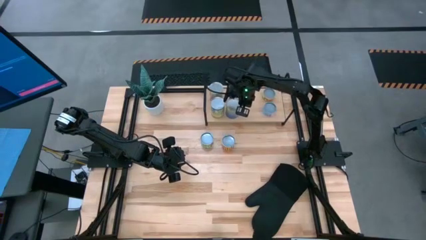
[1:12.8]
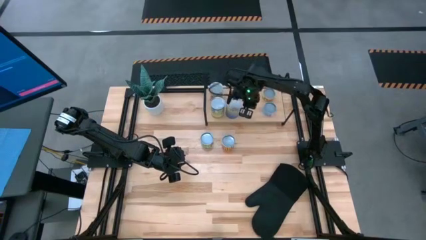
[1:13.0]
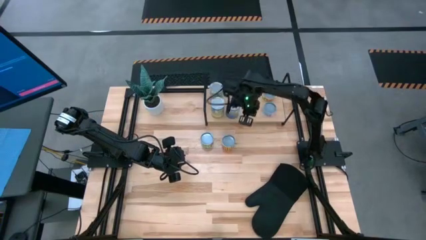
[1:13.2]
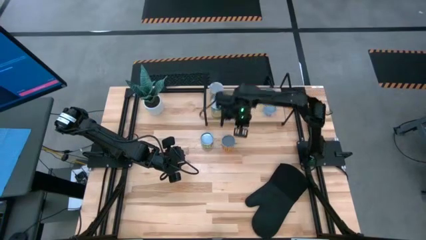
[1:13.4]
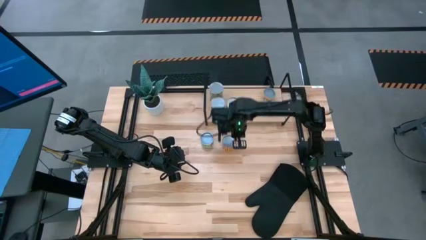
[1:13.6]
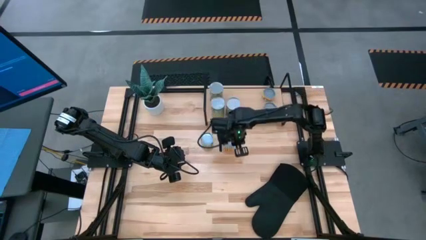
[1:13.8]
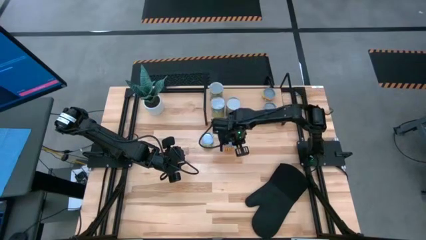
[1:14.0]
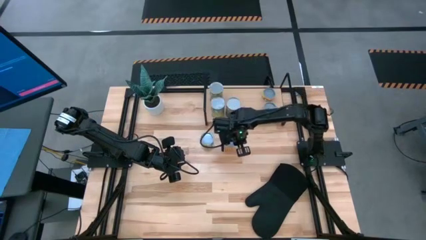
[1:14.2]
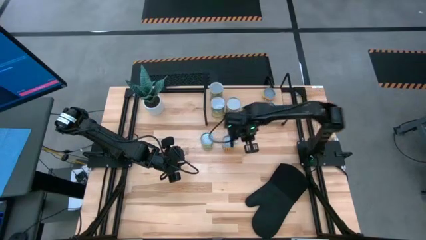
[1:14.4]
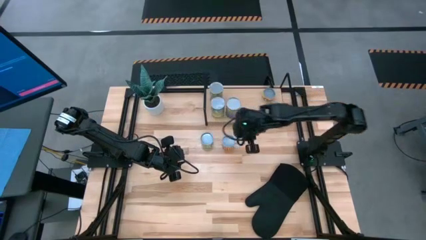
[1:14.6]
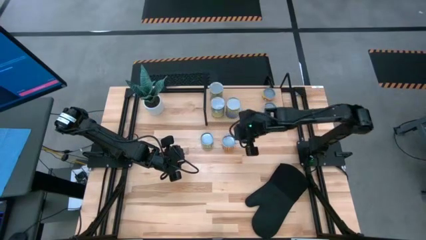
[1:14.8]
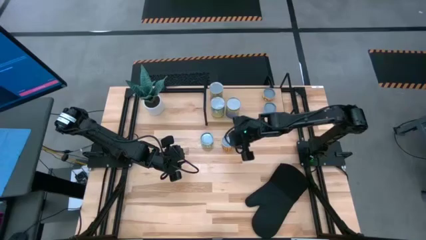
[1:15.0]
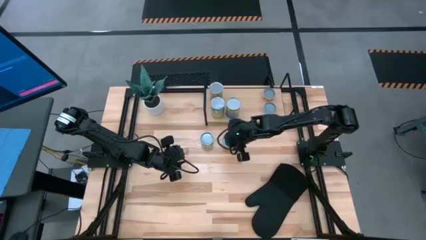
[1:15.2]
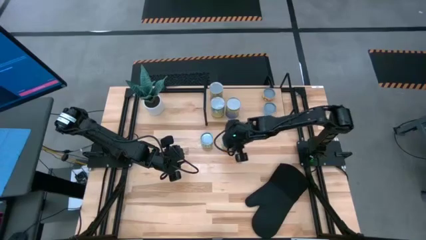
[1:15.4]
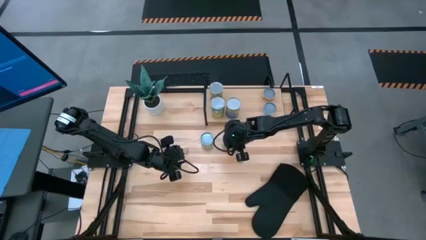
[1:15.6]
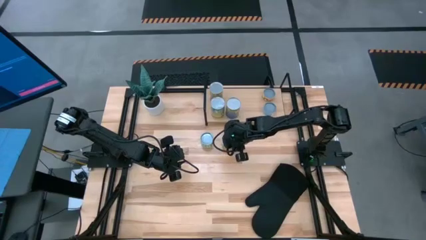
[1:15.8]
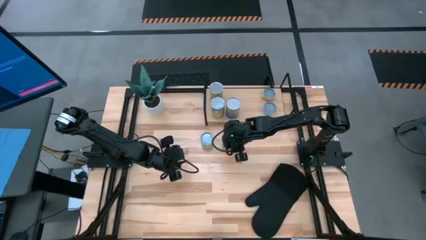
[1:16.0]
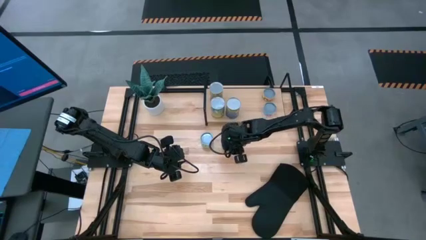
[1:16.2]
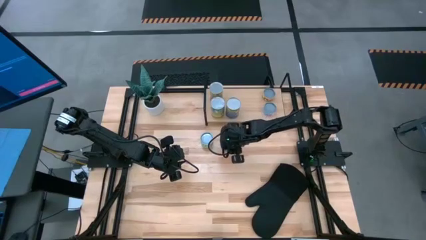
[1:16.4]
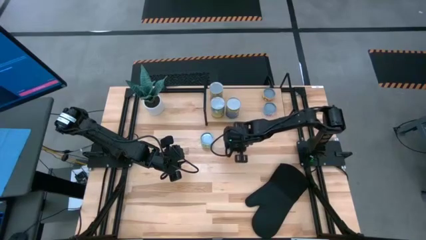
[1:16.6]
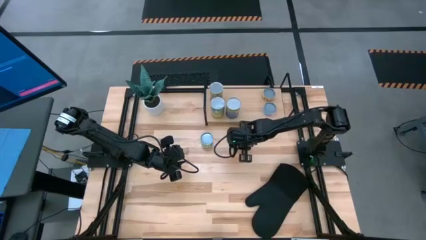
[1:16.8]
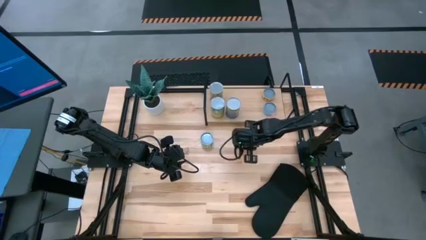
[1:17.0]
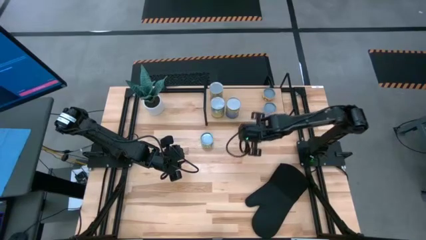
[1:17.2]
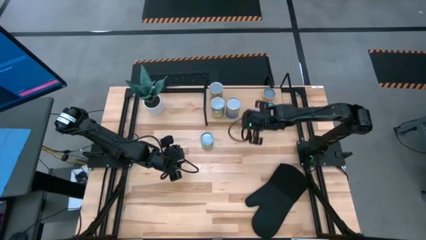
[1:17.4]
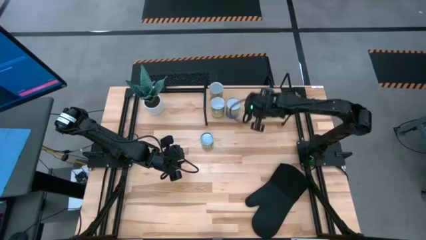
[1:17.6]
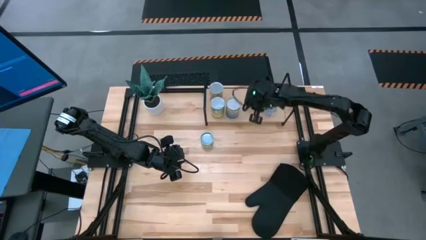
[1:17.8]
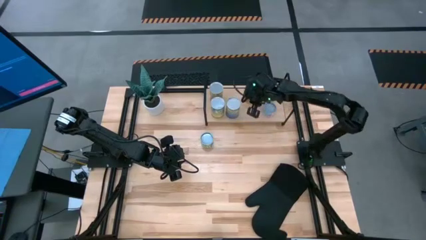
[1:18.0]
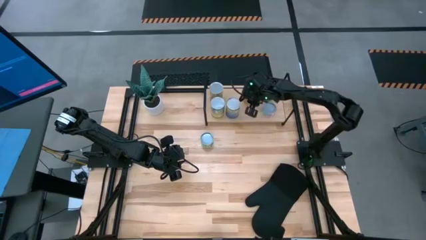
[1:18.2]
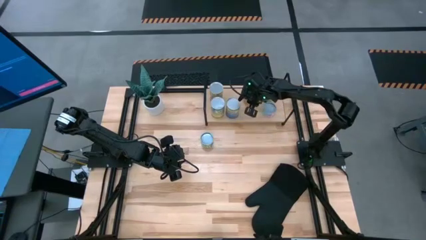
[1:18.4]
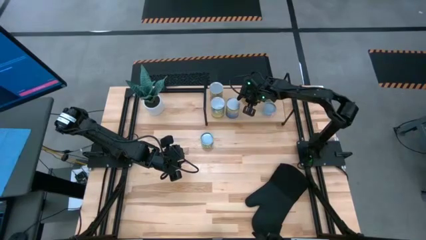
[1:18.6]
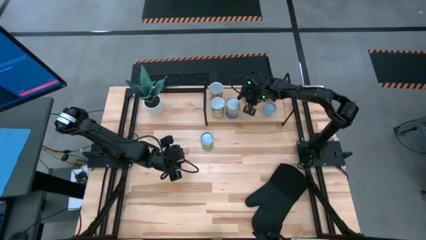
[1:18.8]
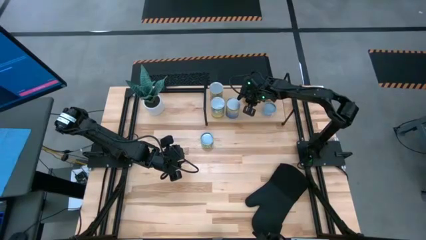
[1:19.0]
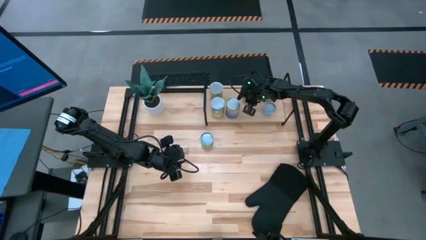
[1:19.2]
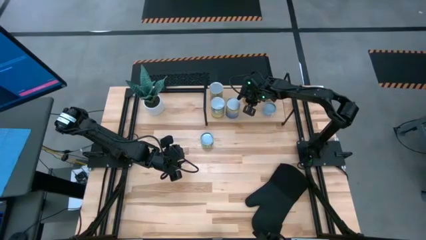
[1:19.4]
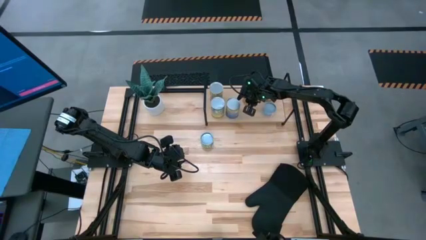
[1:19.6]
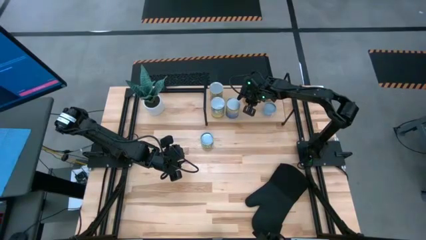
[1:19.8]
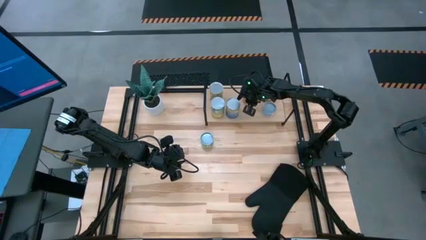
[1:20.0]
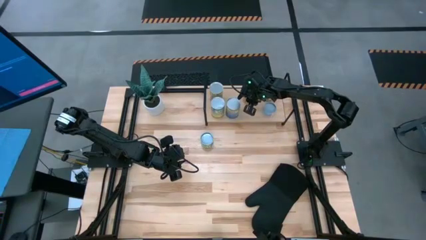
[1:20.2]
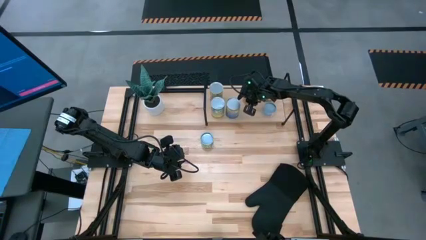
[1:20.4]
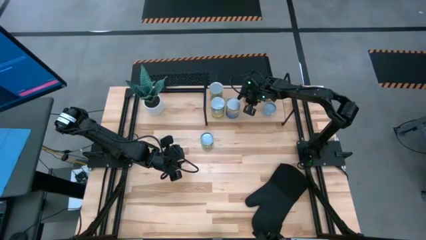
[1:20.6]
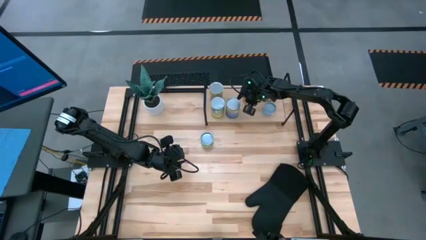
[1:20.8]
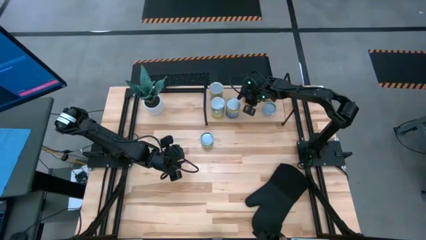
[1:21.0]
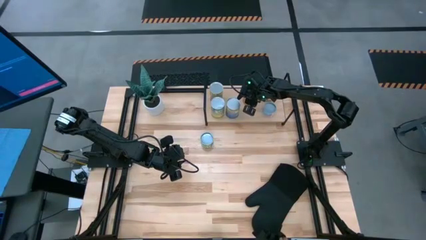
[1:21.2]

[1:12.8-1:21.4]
Task: Pick and place cans onto a shelf
Put the the canned black beans on the shelf

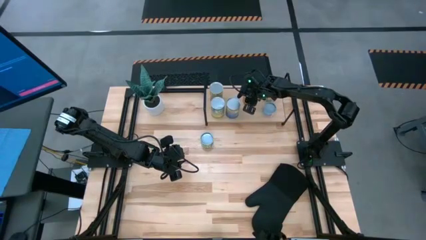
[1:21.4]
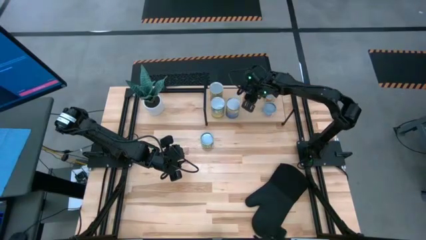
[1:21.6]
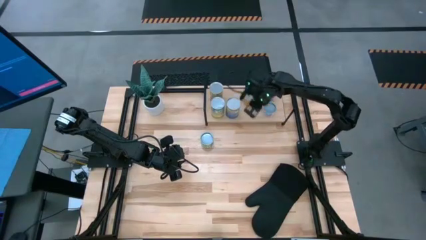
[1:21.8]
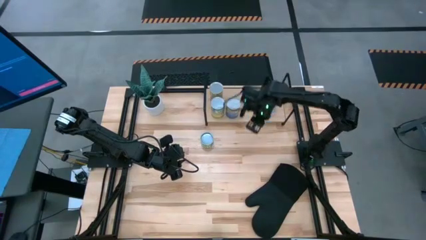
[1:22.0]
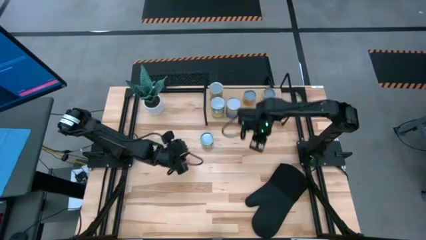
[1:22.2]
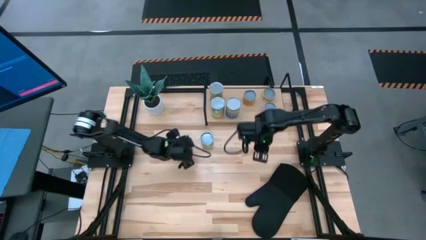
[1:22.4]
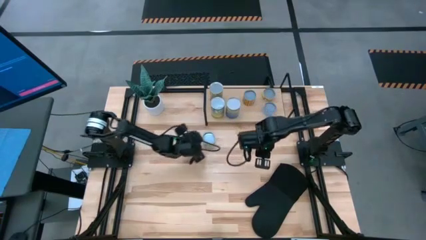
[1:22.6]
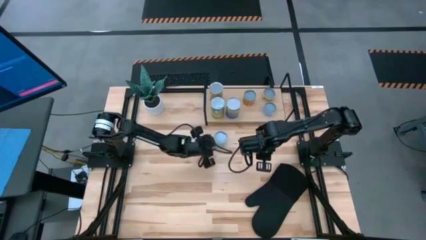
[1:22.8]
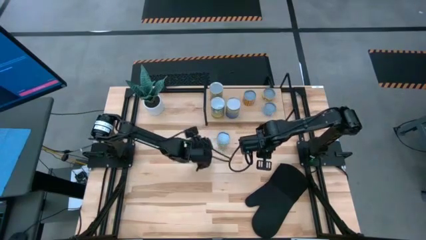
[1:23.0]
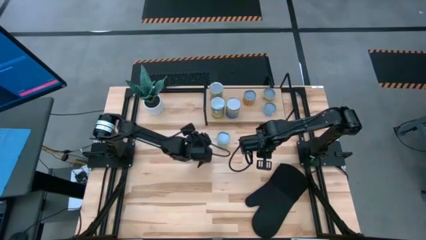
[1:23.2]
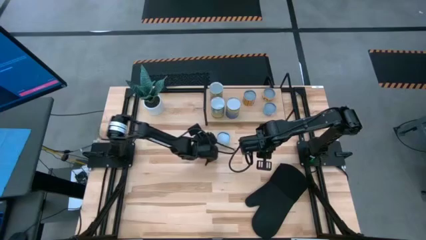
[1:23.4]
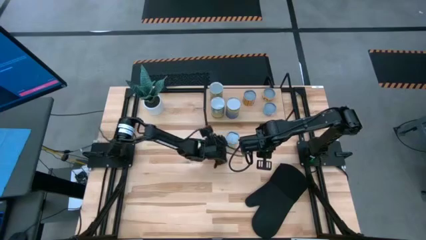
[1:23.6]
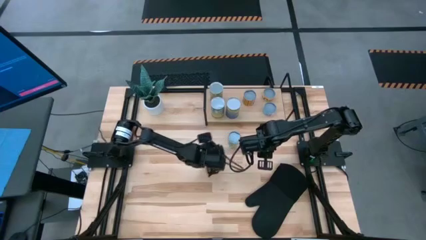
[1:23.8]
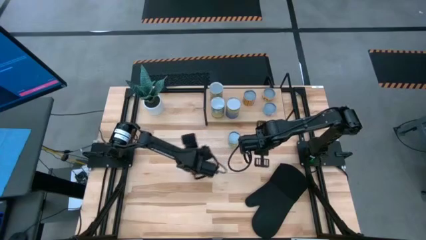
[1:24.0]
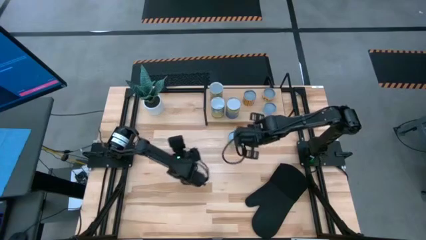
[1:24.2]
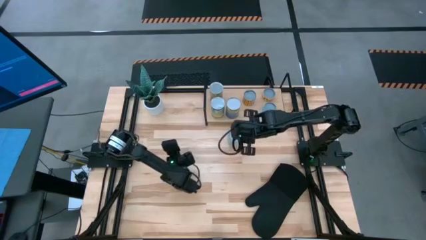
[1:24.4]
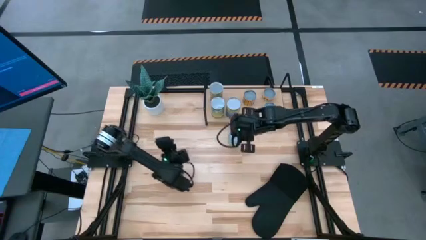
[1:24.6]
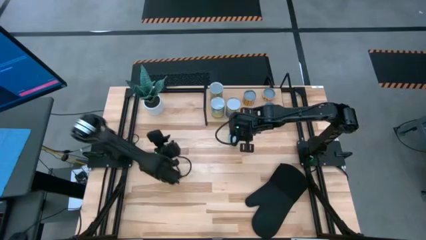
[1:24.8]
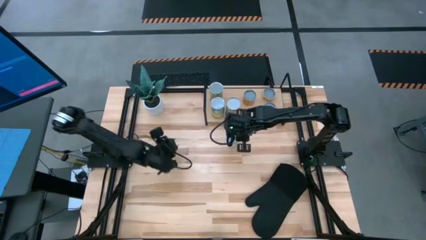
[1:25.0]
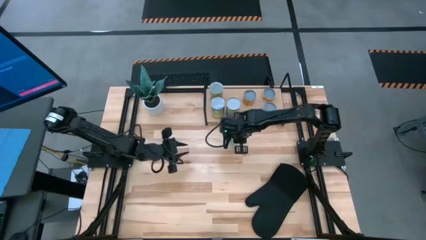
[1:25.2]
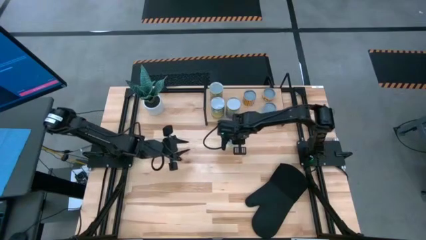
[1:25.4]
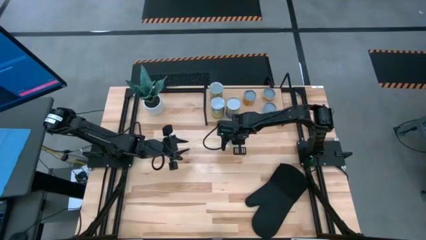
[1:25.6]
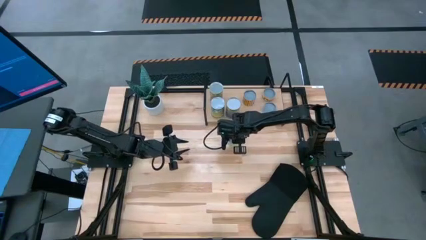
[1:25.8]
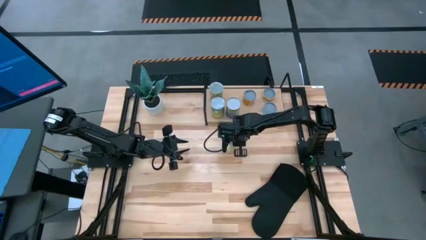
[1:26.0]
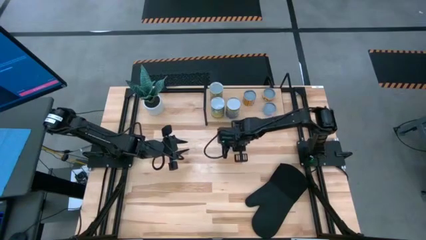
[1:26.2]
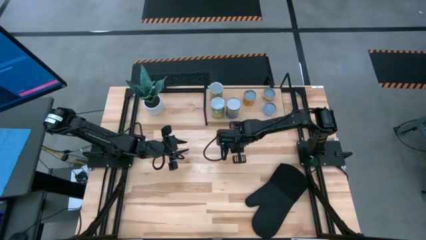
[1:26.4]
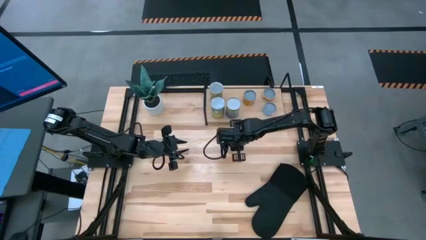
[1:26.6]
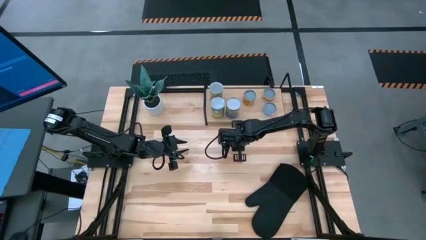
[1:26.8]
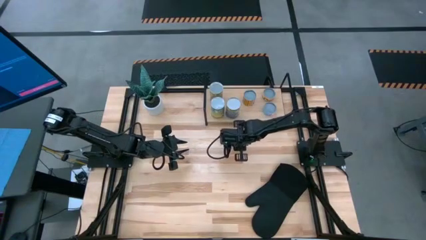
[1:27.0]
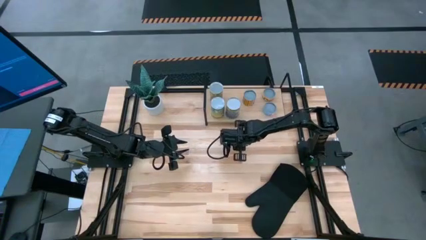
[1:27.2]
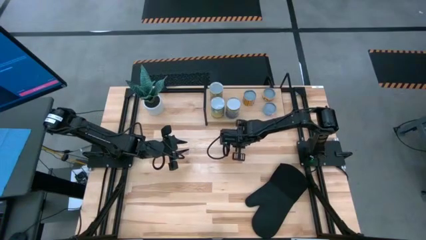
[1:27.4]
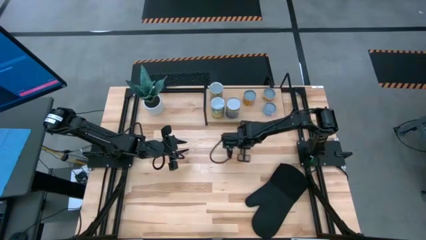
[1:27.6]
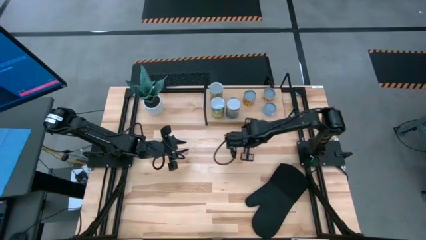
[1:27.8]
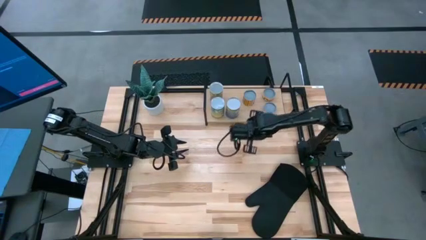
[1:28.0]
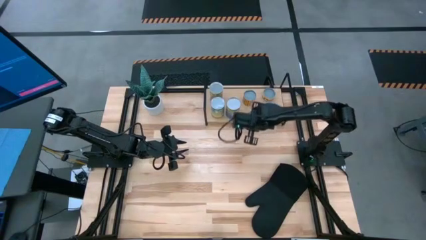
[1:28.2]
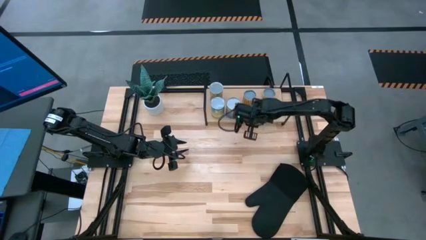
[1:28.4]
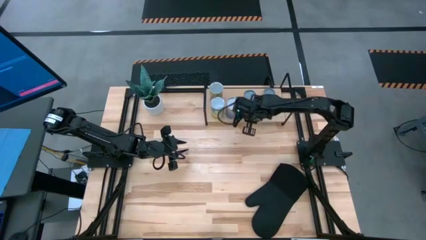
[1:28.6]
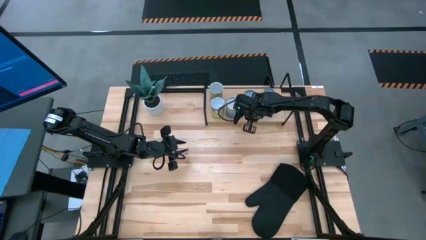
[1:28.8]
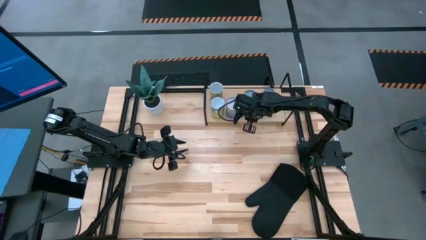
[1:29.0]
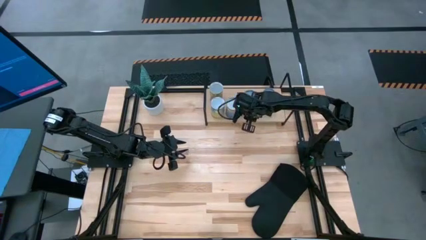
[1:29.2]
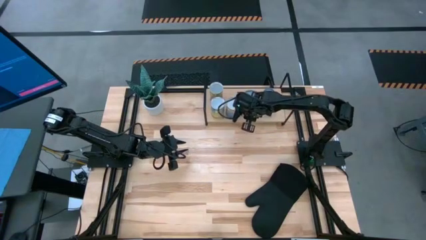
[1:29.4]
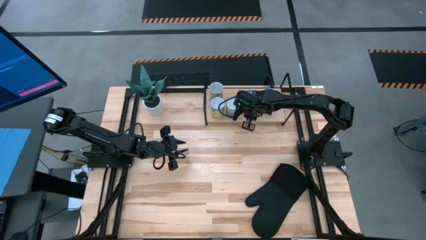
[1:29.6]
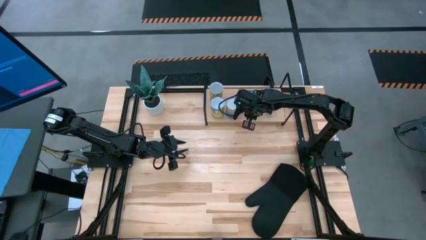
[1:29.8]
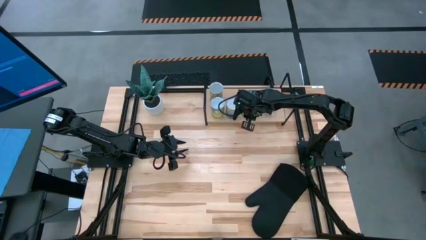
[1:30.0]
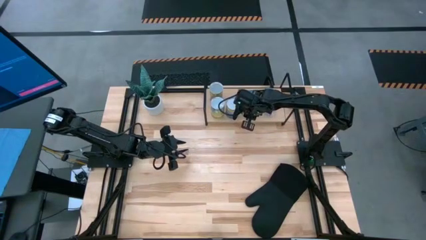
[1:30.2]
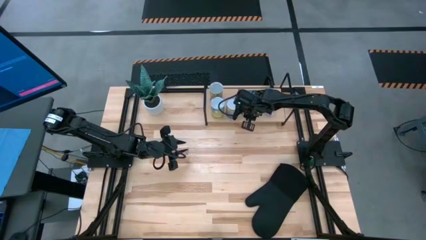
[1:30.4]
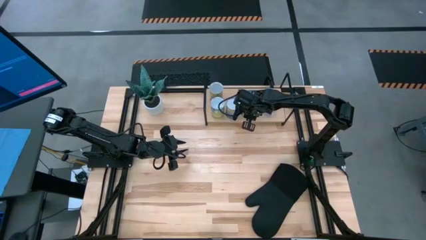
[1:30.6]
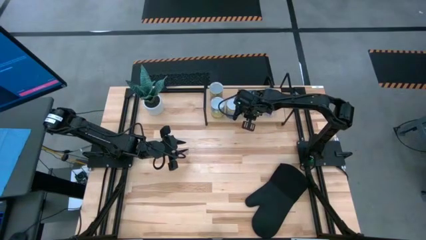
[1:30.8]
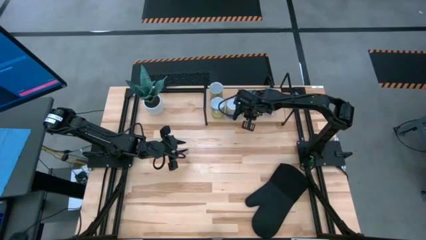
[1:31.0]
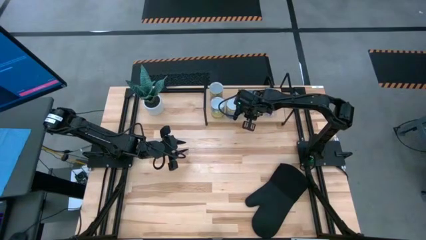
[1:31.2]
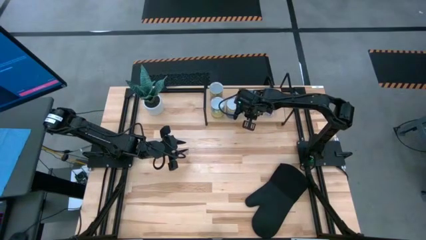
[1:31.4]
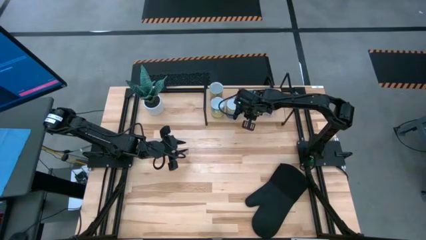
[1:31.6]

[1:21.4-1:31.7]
Put the canned green peas on the shelf
